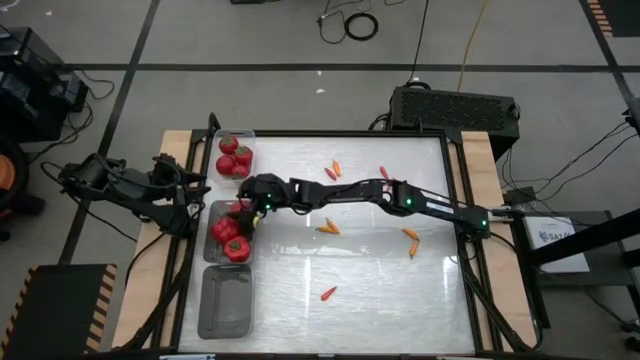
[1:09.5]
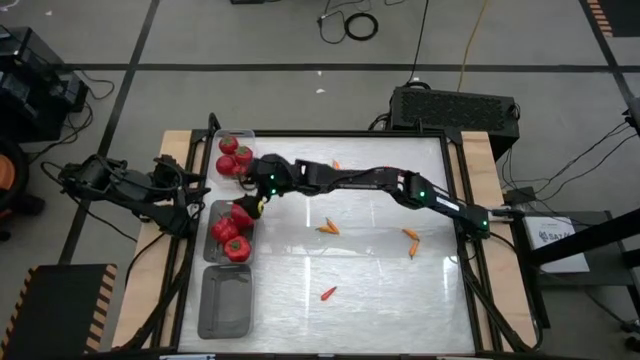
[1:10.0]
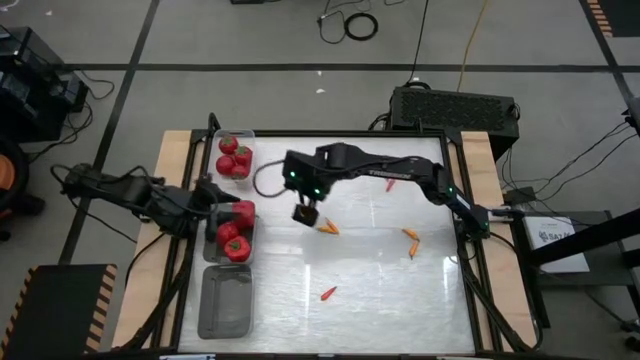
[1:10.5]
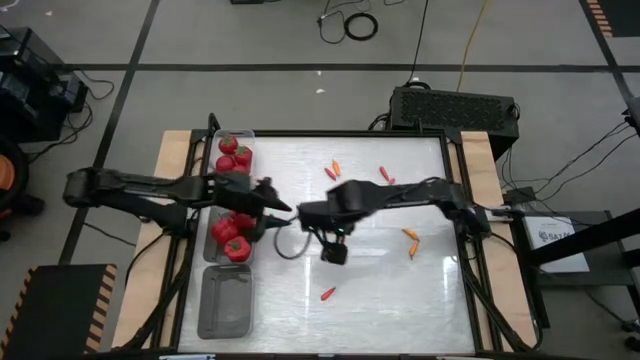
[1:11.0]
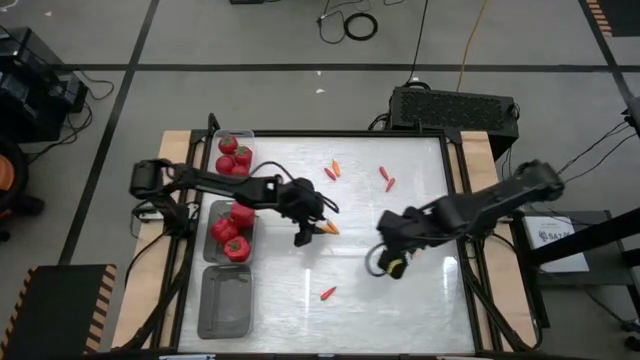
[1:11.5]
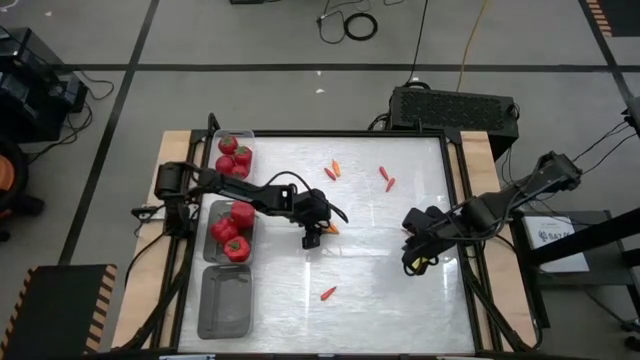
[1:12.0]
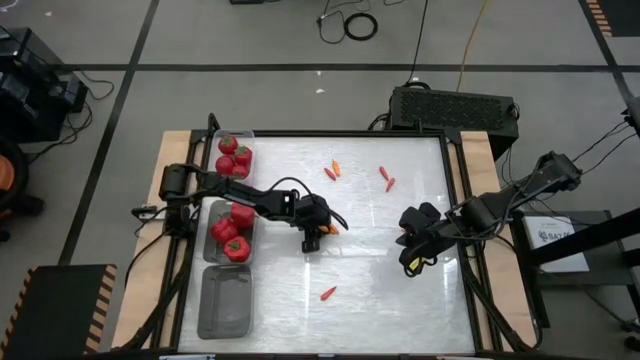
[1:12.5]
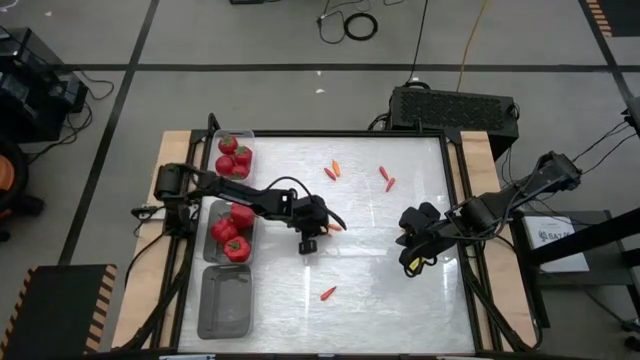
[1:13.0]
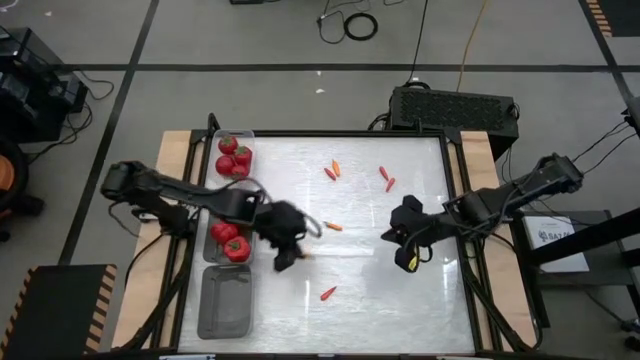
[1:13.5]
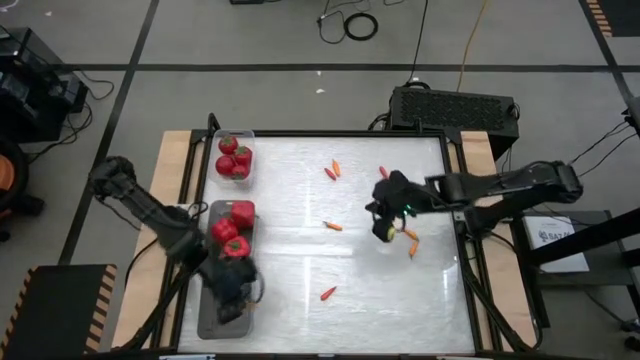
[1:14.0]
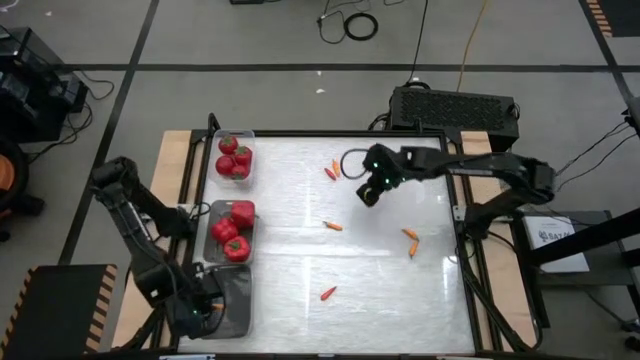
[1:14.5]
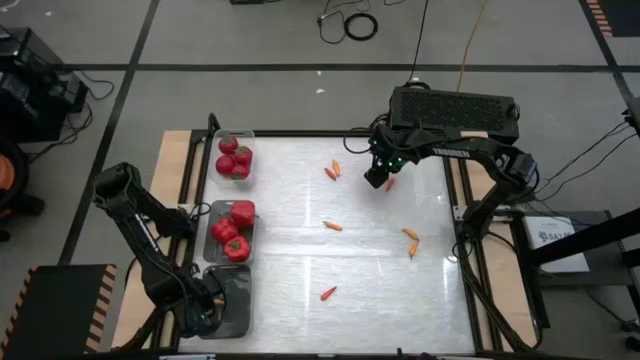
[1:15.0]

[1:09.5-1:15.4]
Task: Sort produce into baskets
Put the yellow chili pepper into the bottom black bin

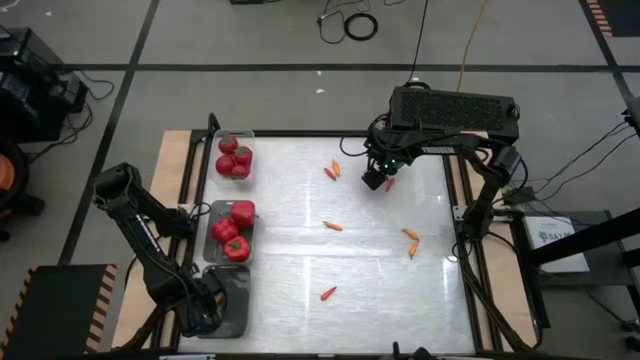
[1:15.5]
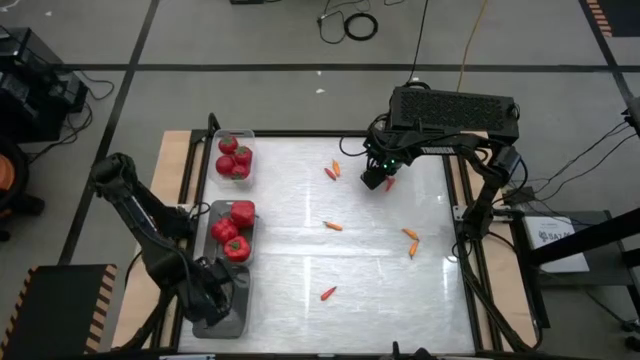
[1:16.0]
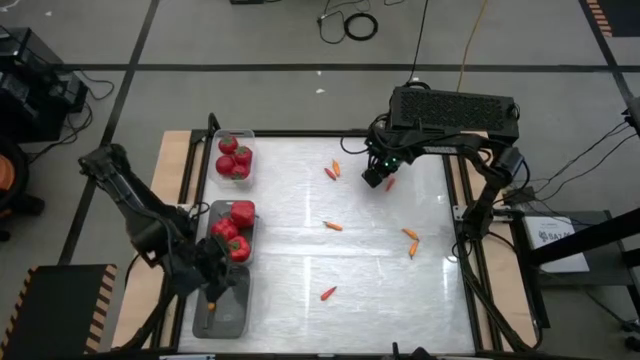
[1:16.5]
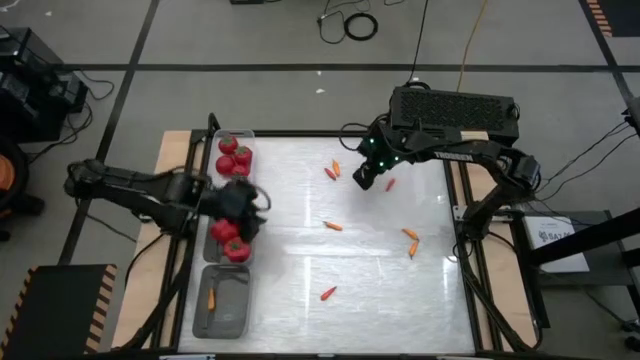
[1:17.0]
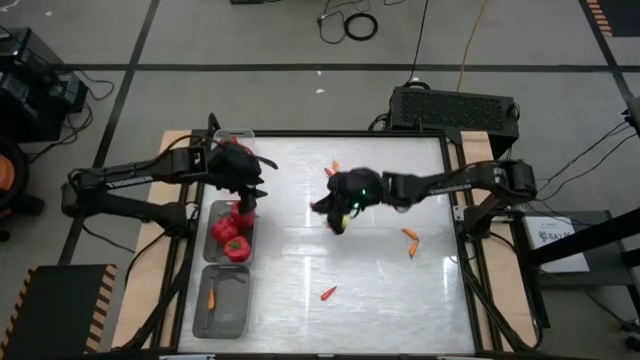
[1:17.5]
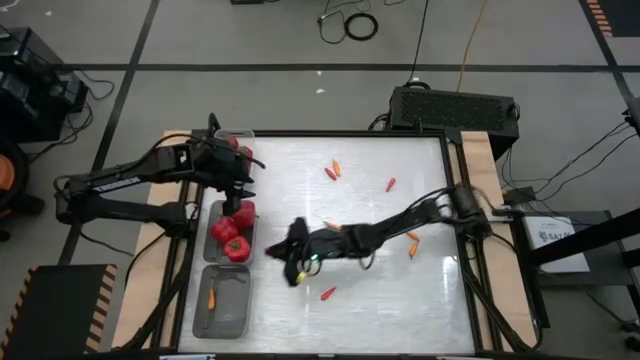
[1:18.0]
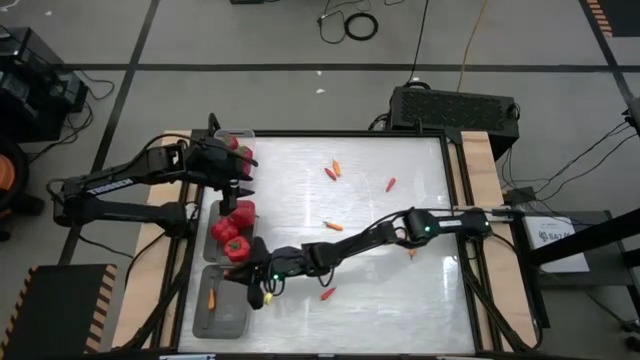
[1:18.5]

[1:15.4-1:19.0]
Put the orange chili pepper into the bottom black bin

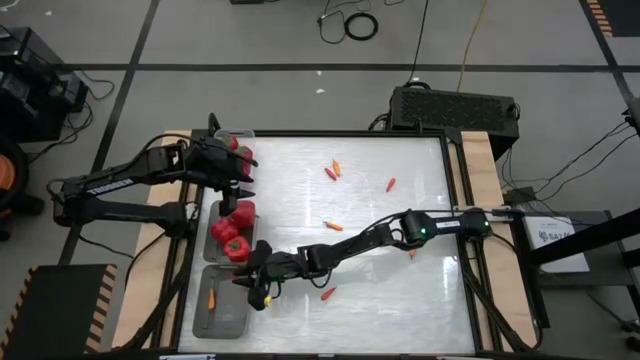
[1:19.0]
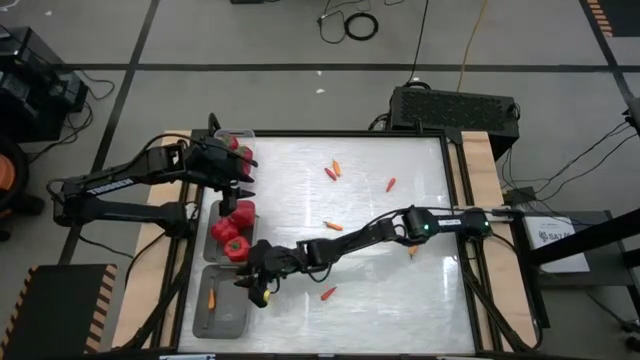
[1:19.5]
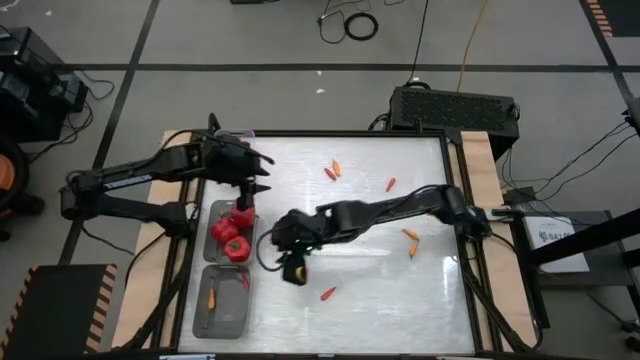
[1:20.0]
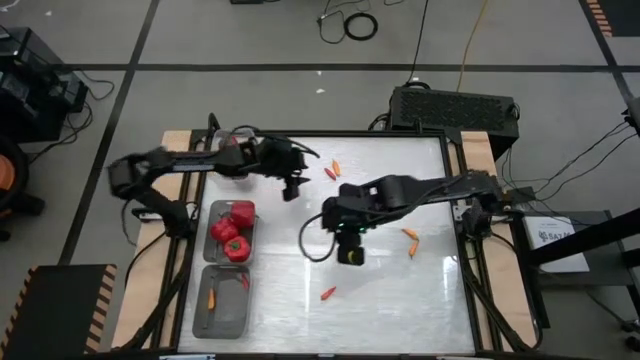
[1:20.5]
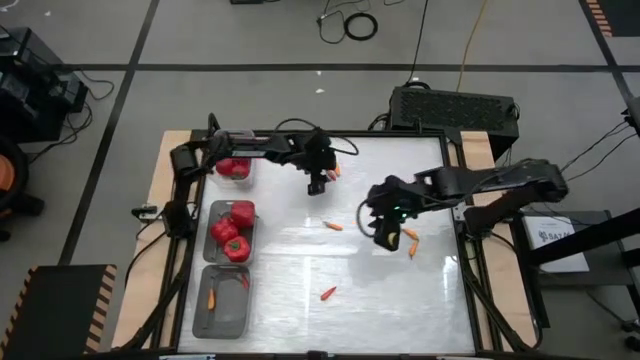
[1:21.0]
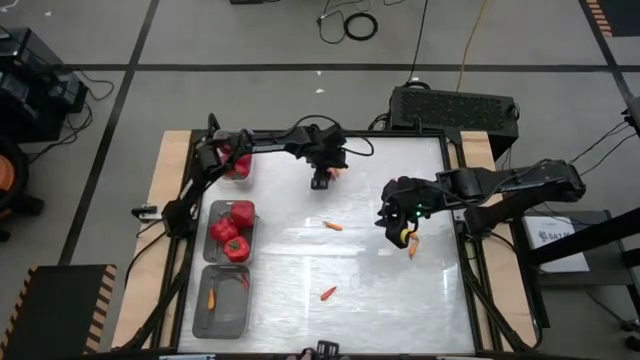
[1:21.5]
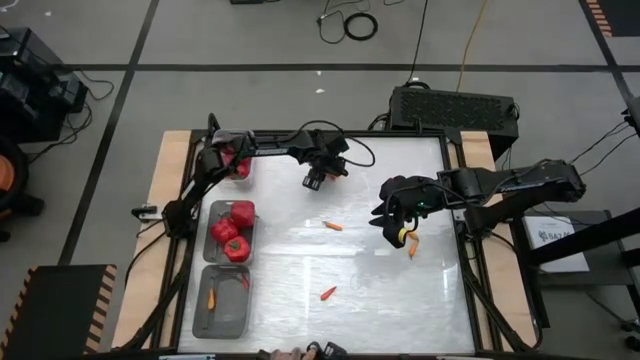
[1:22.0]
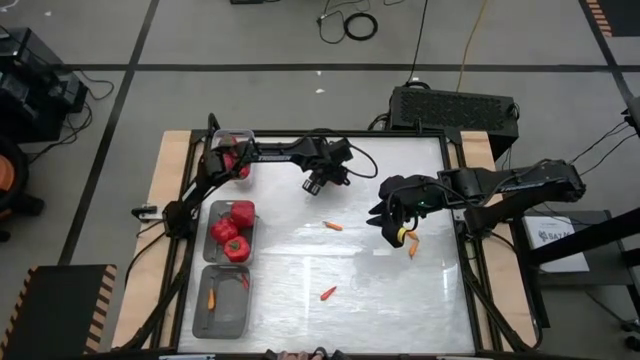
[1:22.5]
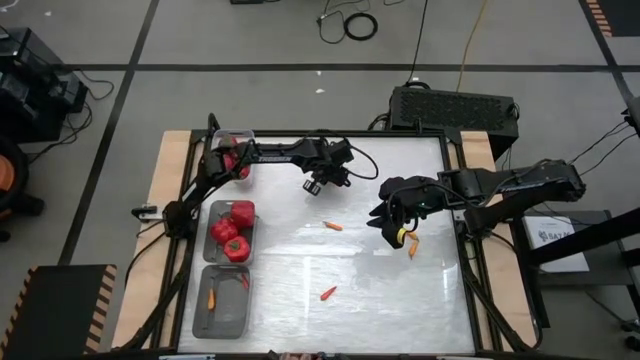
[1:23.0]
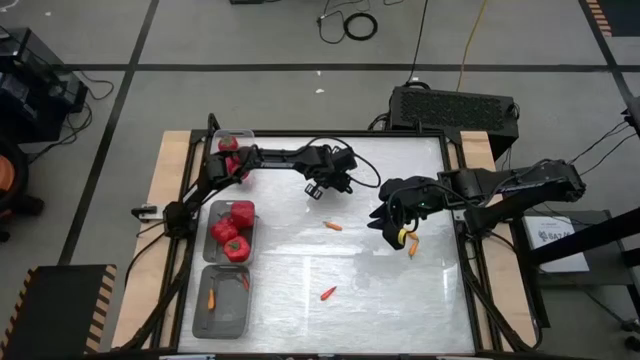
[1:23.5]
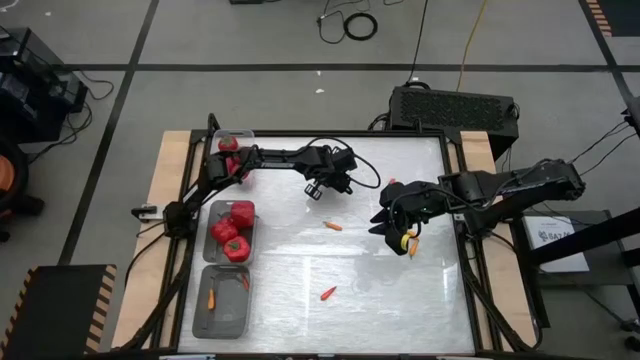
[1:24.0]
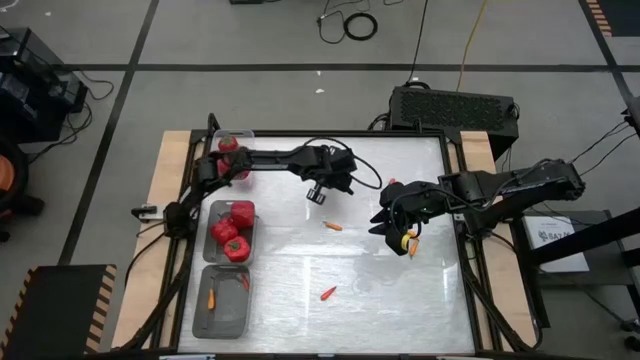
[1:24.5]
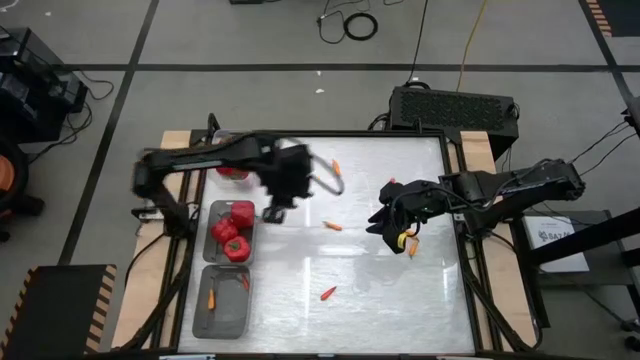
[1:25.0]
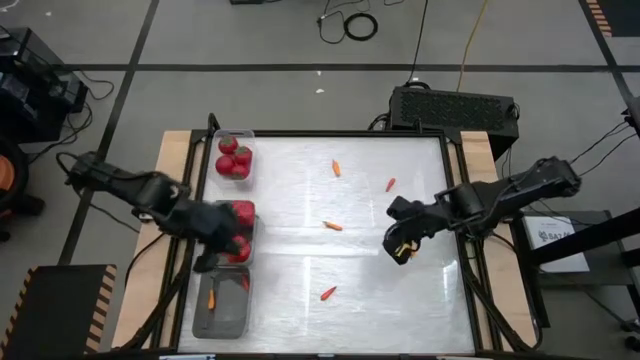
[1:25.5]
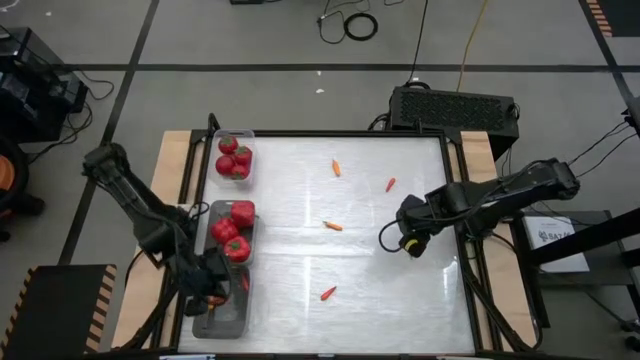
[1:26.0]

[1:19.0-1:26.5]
Put the orange chili pepper into the bottom black bin

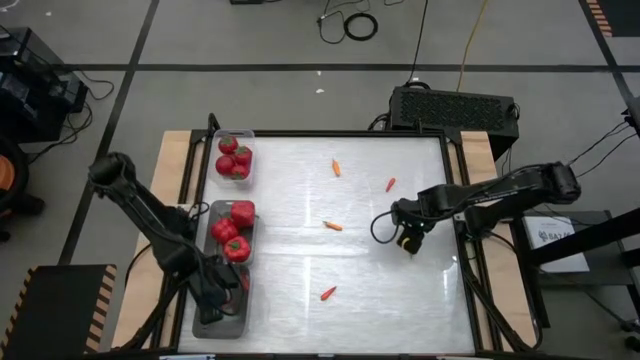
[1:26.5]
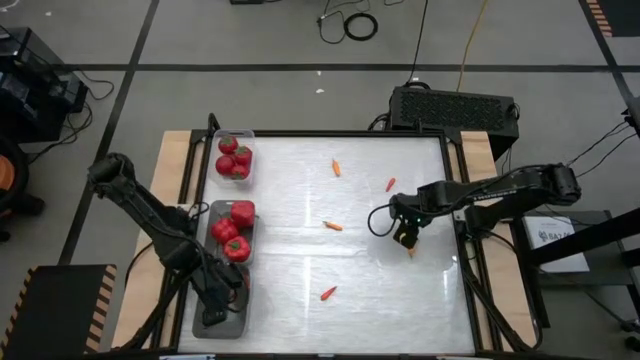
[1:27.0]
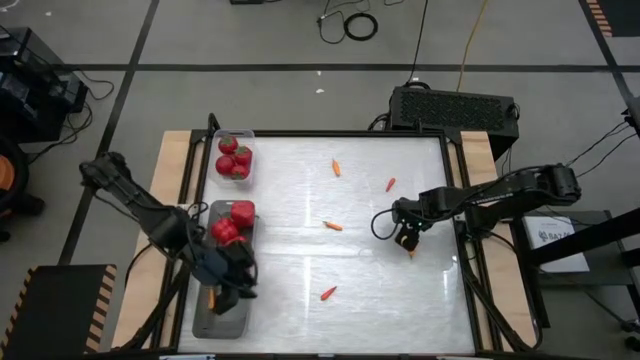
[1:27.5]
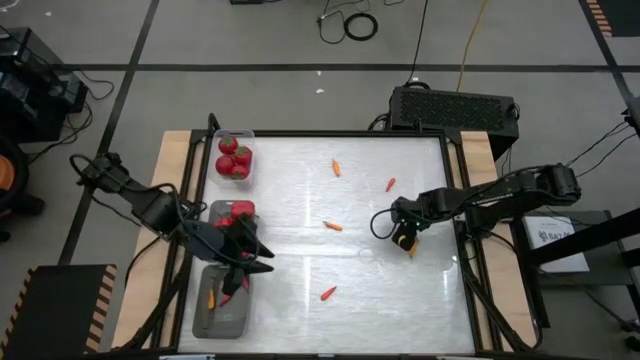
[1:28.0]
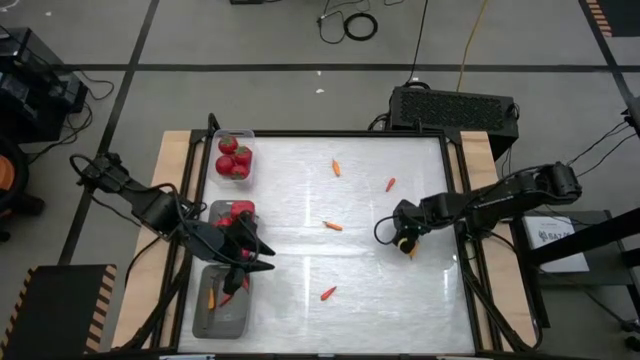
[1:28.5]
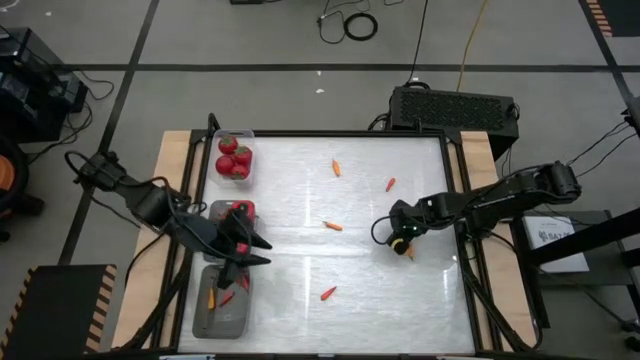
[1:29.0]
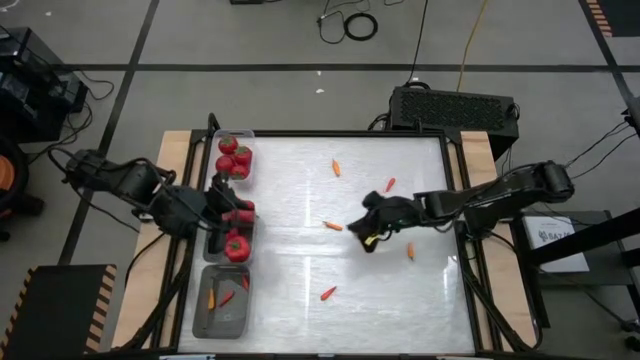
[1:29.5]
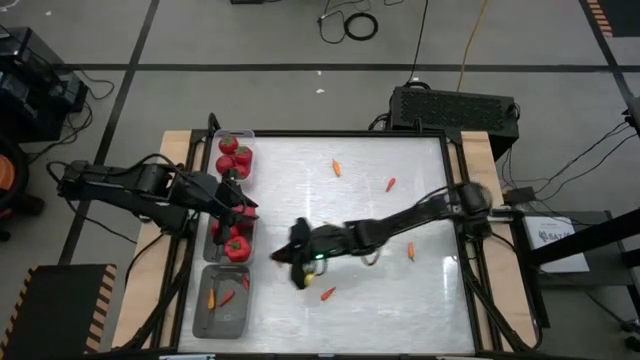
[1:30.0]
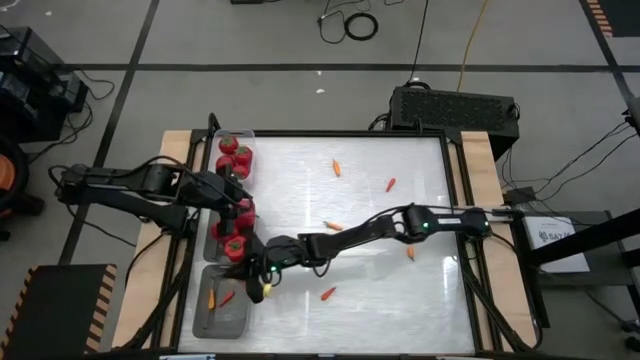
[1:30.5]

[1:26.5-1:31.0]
Put the yellow chili pepper into the bottom black bin

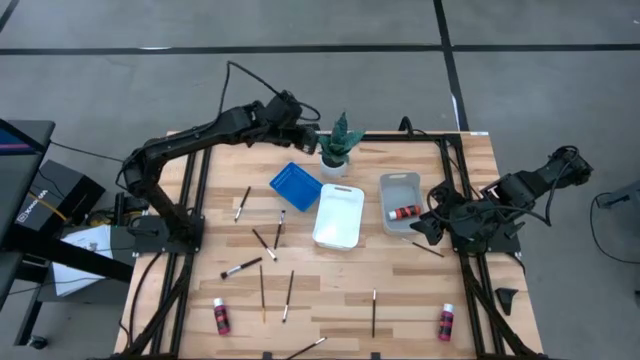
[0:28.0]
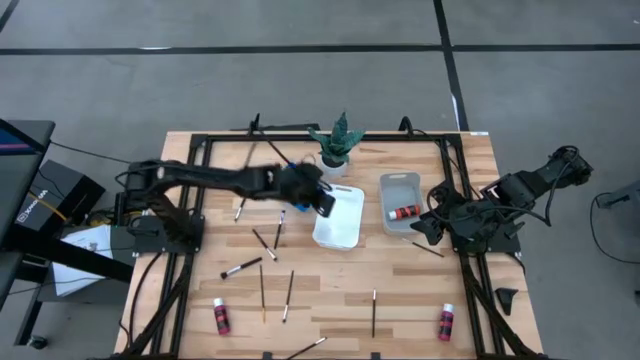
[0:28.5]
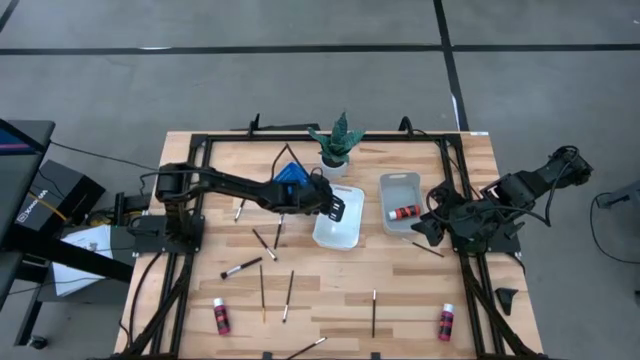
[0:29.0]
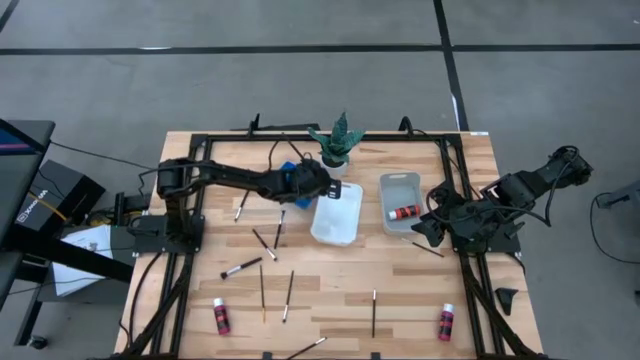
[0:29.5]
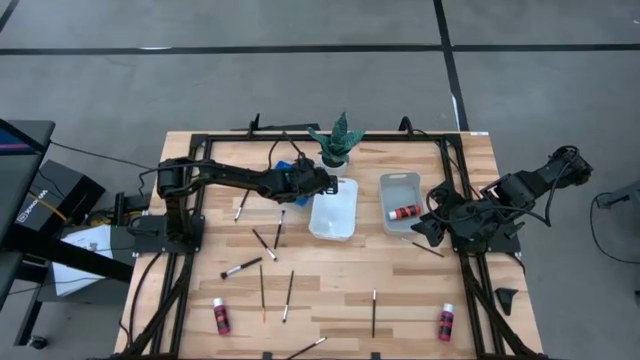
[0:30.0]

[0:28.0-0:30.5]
Task: Pick & Place Paint Supplies
Adjust the white bin
